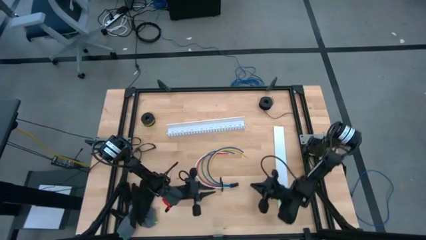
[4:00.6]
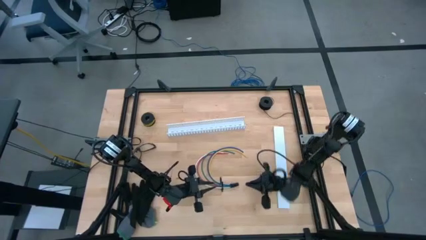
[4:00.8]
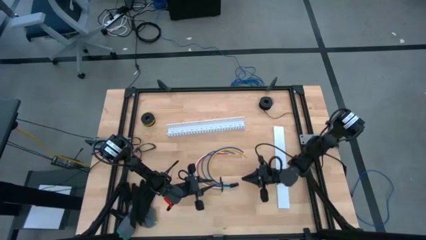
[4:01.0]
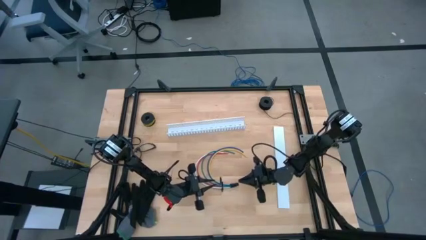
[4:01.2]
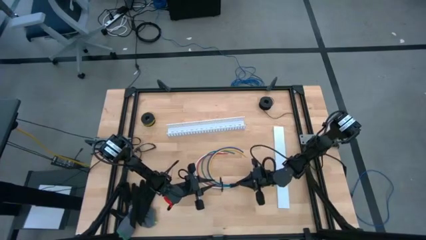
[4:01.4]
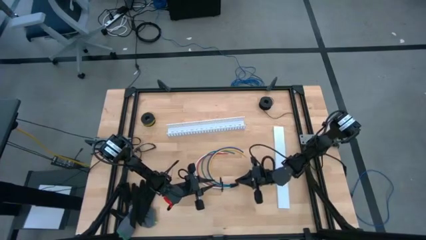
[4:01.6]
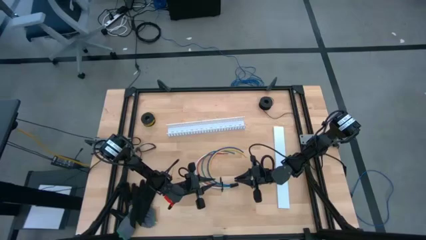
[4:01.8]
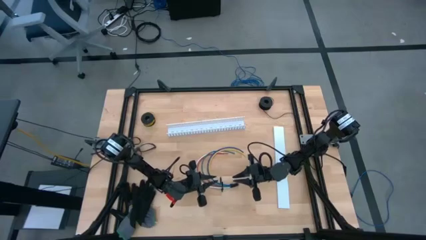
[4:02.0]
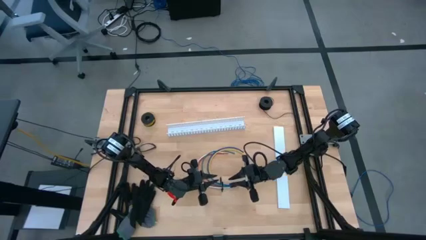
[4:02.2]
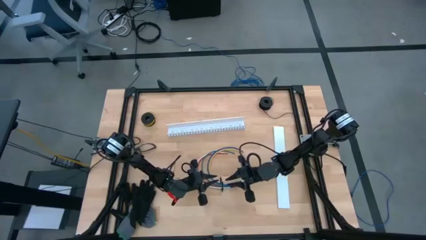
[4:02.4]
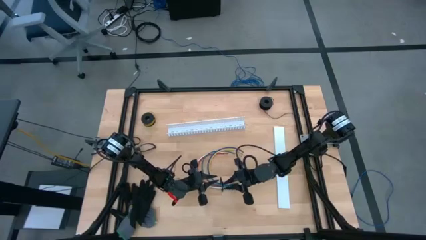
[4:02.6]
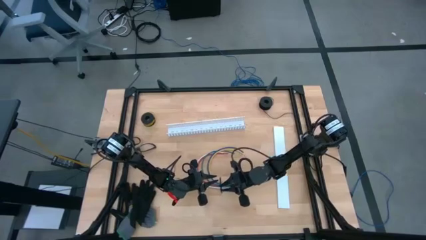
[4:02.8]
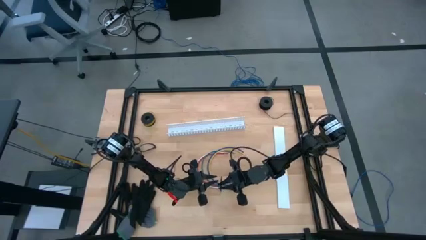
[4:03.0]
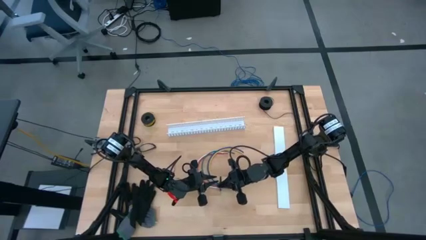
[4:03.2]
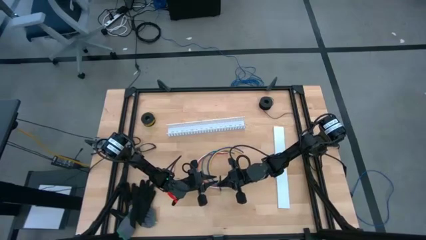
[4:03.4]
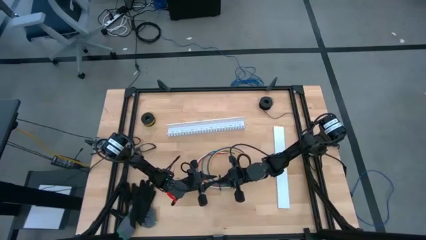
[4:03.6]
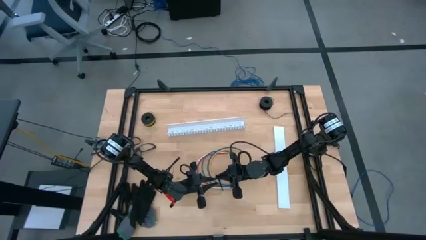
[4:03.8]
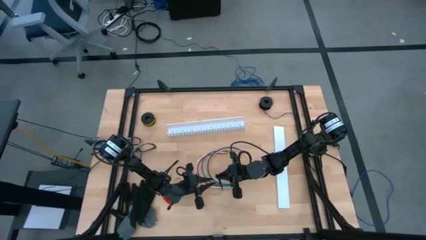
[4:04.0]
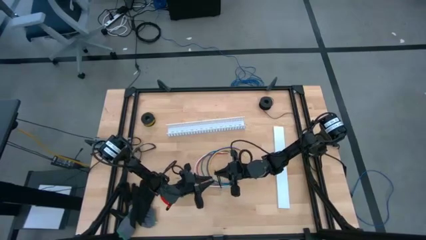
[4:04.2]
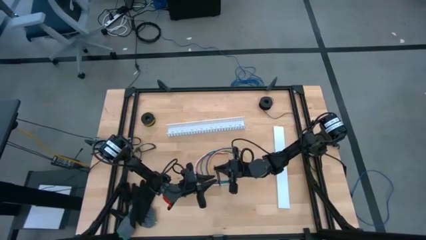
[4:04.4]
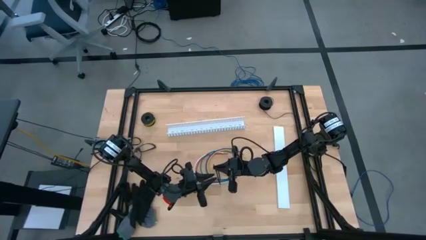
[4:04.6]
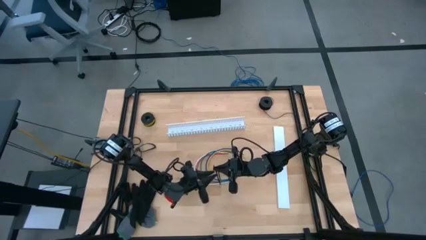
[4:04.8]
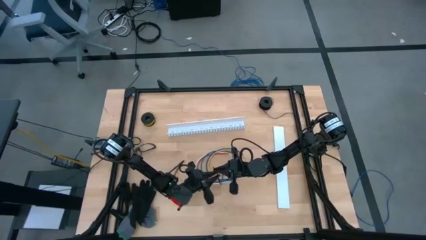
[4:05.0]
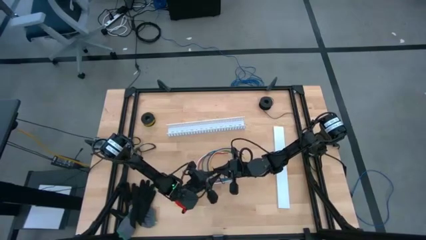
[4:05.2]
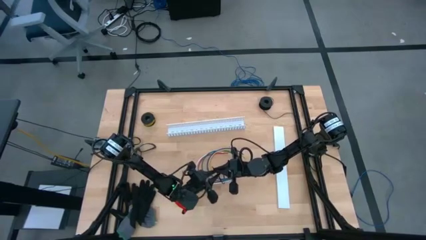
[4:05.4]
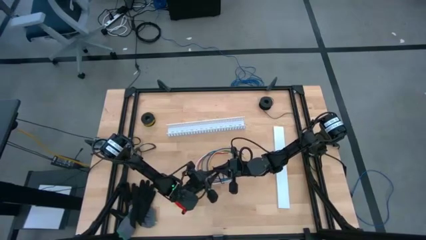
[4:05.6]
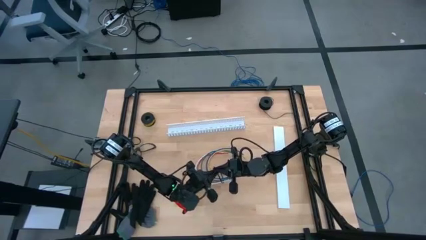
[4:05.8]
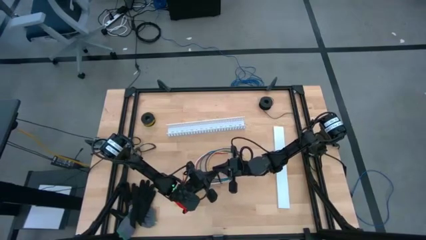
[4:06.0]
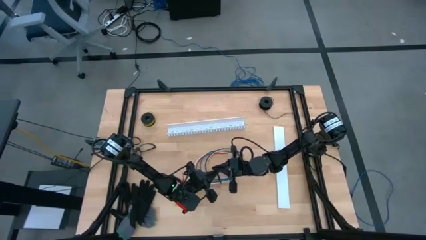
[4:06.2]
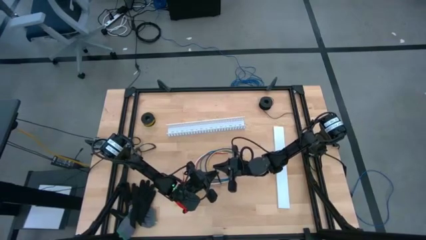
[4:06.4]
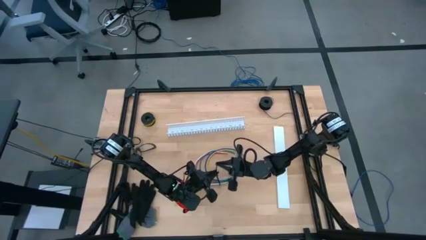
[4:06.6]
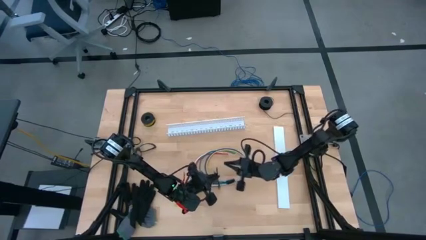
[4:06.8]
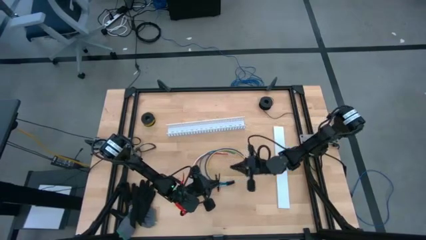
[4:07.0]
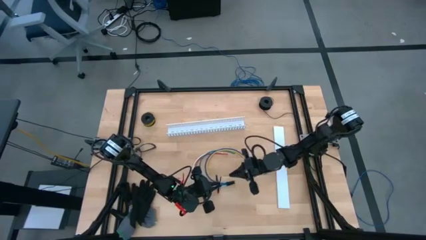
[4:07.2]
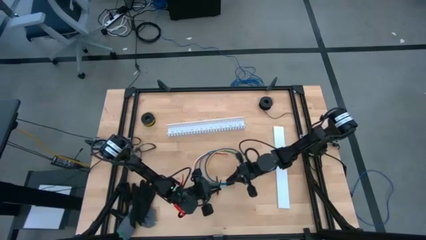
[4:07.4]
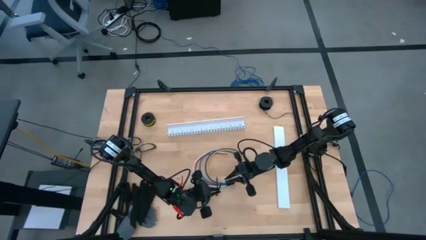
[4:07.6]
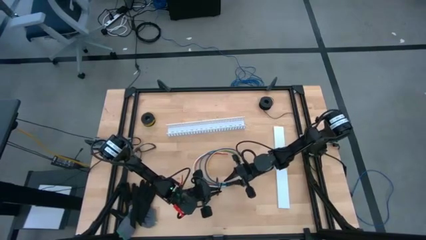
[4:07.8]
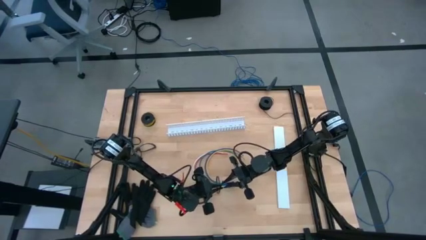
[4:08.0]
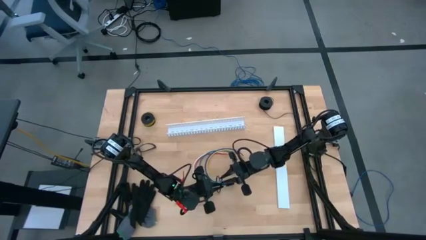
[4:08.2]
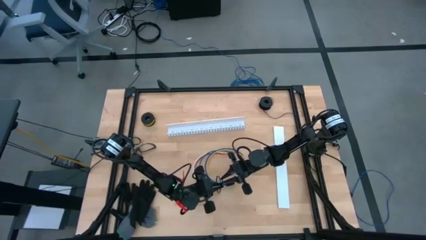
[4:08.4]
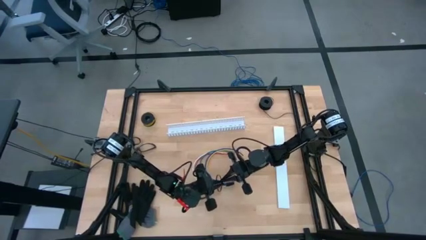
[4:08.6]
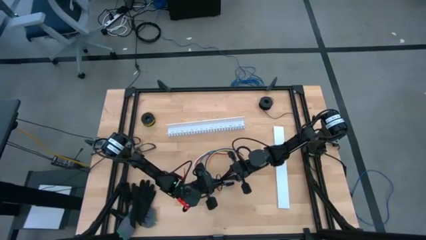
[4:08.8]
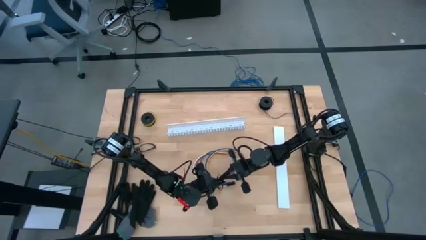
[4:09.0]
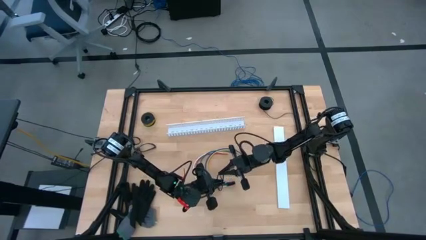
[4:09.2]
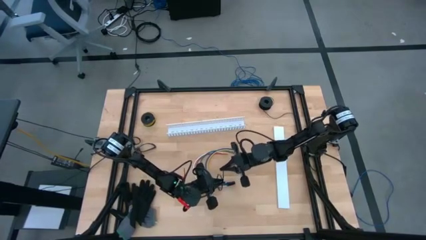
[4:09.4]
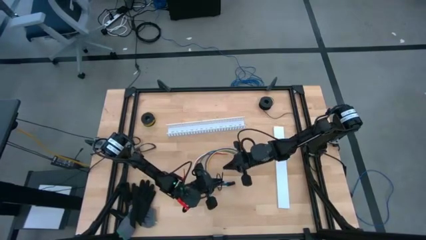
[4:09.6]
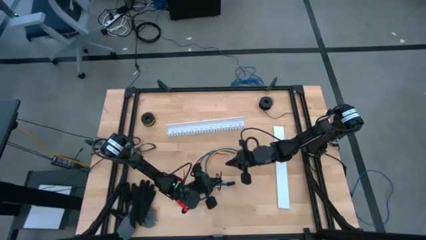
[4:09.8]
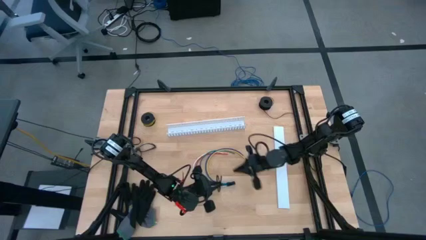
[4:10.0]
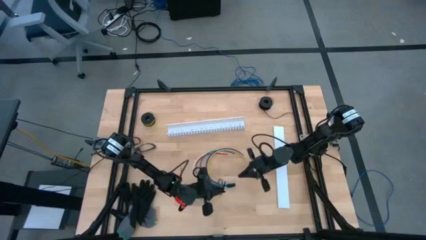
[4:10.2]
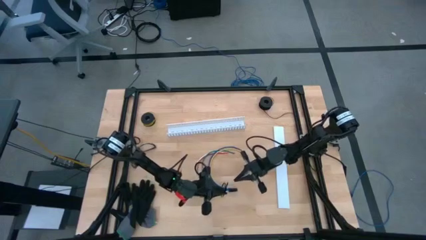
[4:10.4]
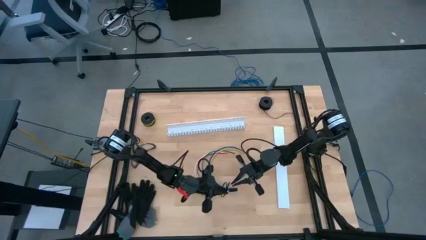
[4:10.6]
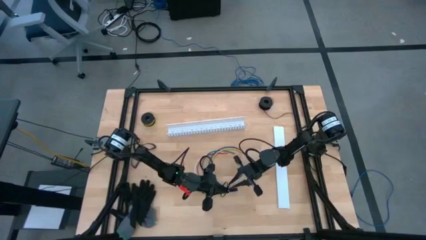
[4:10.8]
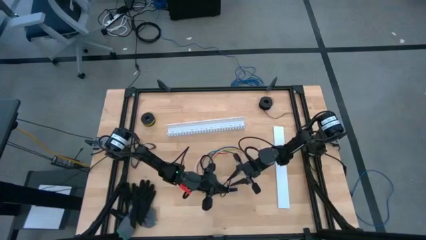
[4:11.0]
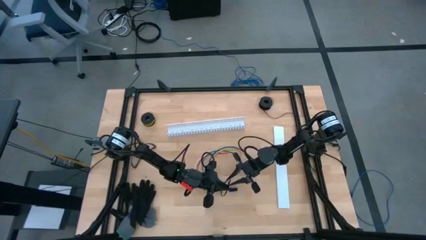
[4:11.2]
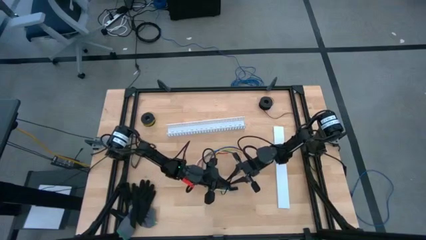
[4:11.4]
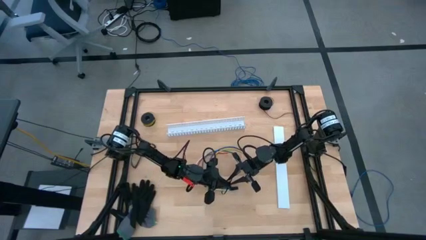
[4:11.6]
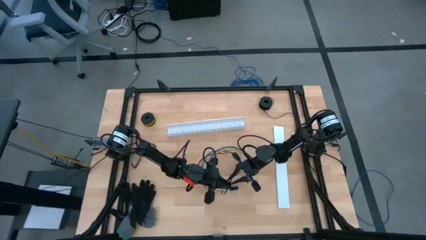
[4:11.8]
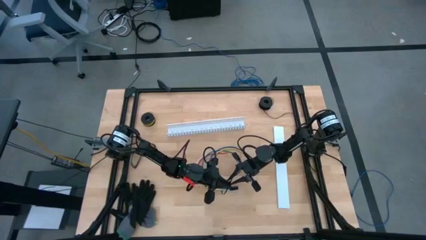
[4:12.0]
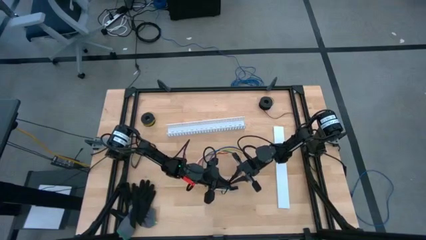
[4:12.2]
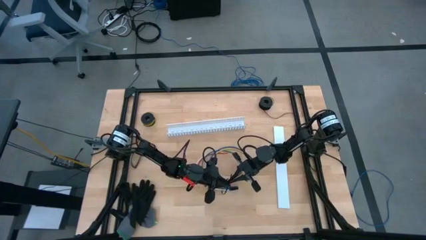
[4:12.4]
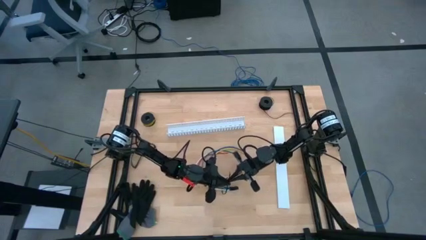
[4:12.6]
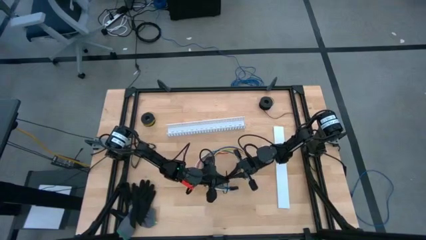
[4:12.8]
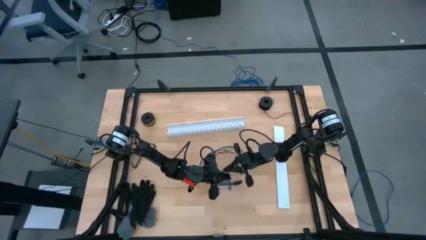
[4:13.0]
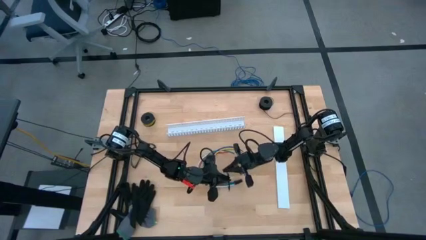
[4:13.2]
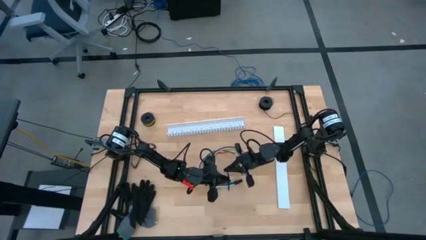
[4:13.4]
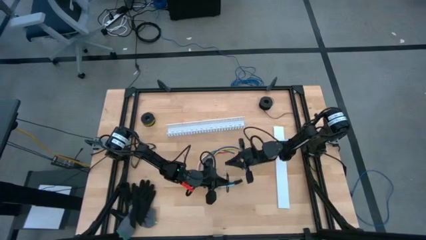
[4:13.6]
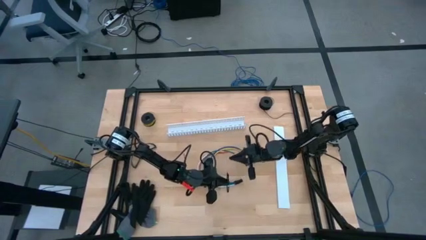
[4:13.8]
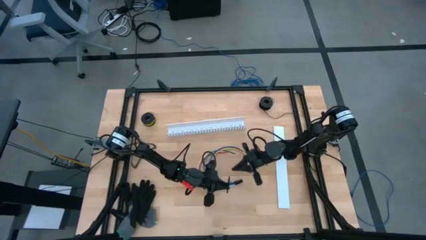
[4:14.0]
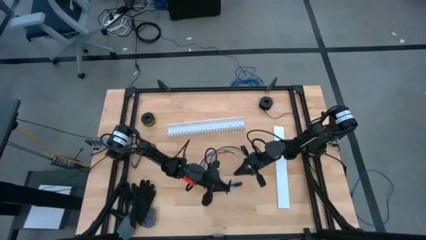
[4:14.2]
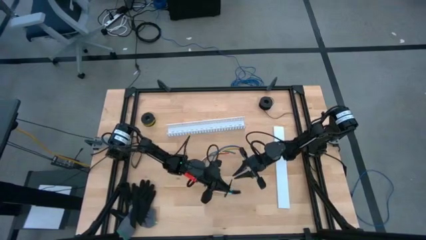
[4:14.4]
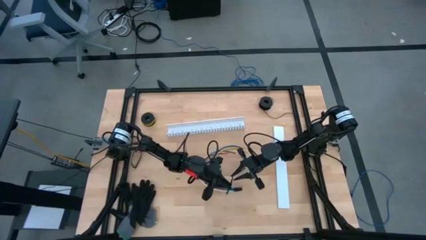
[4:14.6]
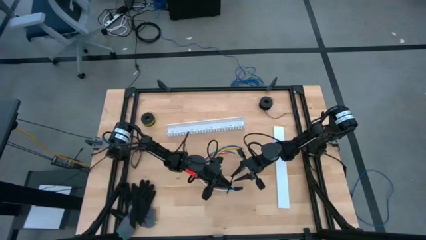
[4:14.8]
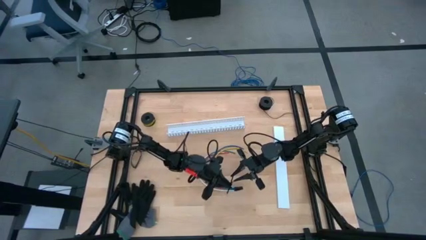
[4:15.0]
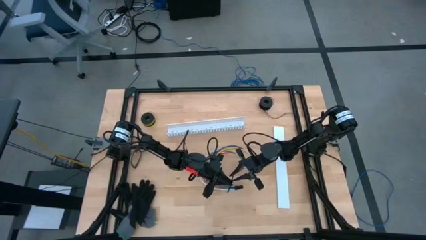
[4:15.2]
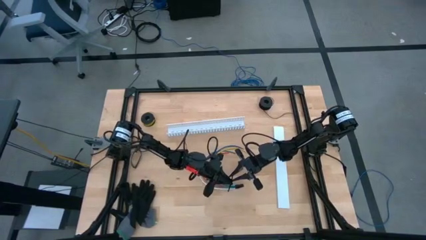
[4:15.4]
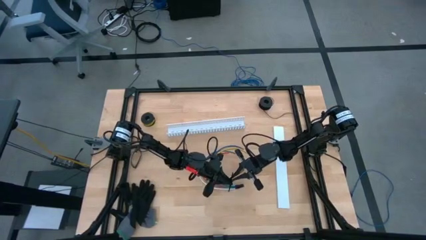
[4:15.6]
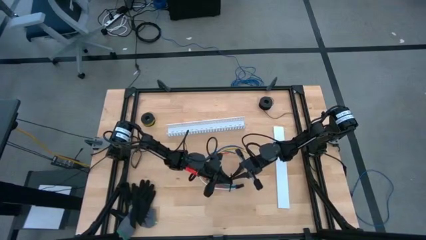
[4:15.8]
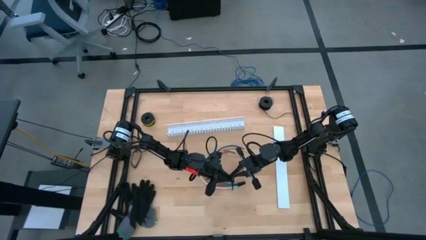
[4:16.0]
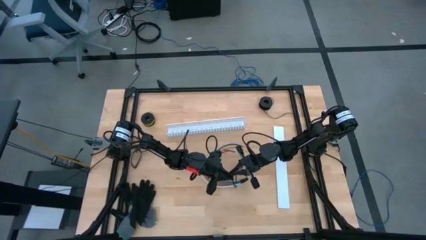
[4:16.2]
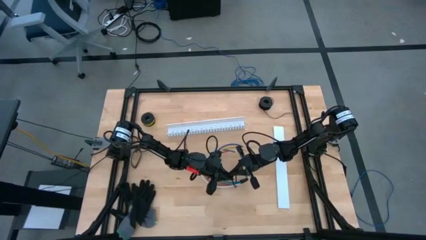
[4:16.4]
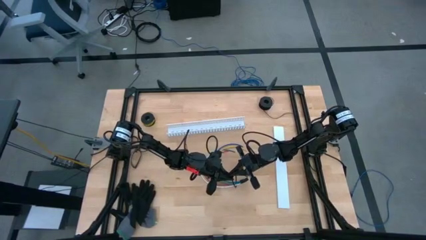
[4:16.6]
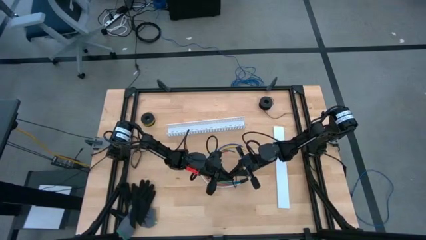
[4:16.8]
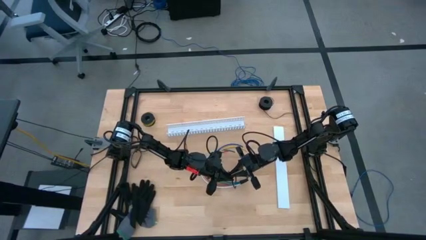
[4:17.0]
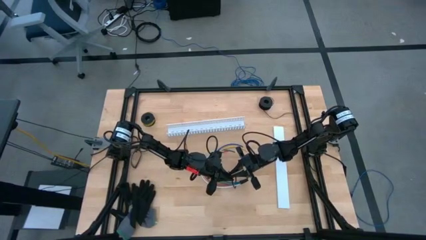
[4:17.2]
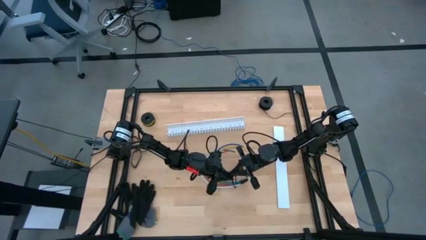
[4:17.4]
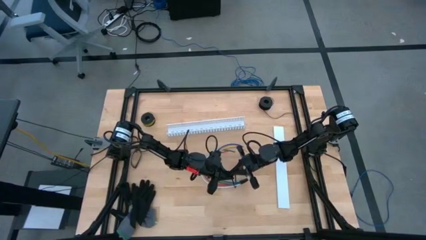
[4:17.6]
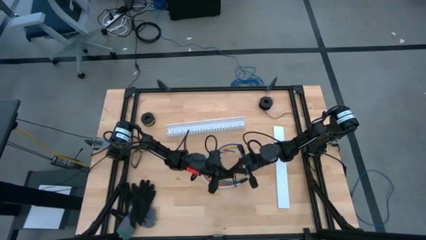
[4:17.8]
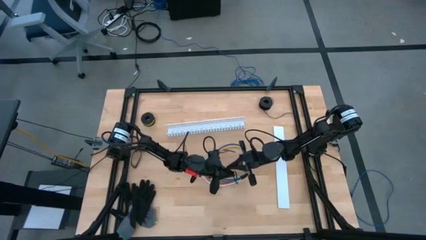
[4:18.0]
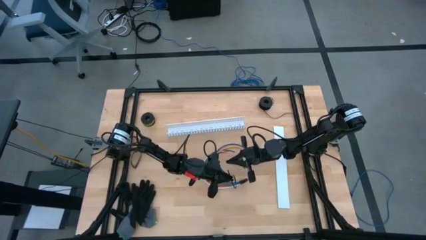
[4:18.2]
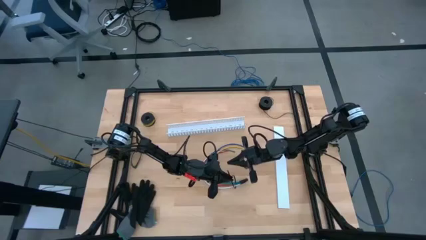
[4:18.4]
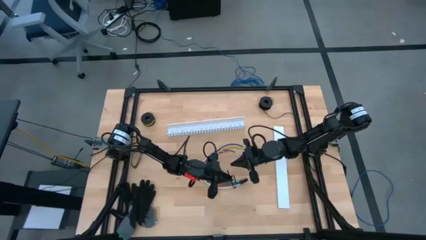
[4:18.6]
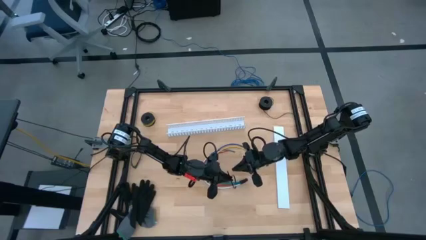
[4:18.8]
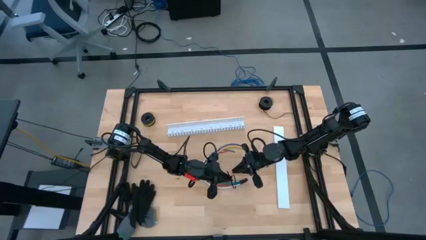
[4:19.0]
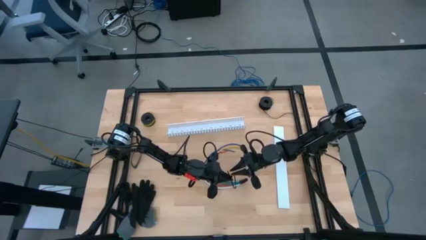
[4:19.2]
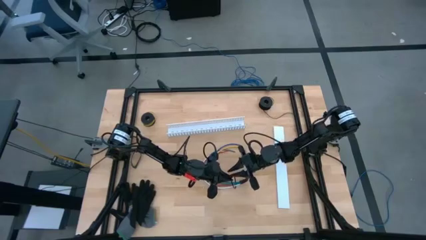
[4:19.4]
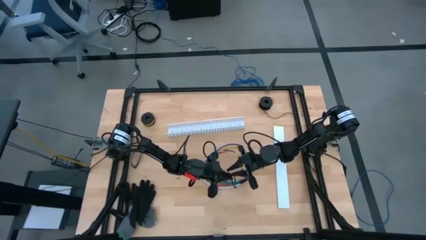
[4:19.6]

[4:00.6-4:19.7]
Task: Ziptie cables
Insert zip tie on the cable wire
